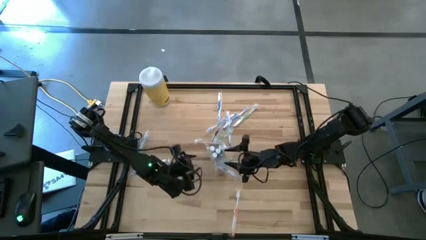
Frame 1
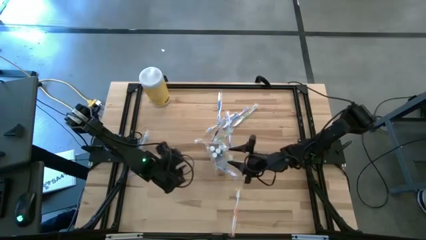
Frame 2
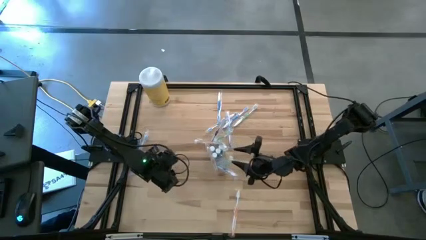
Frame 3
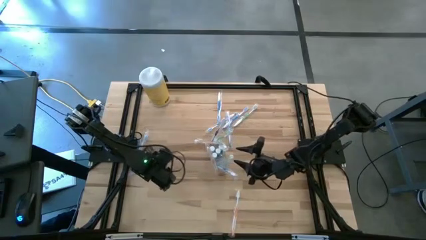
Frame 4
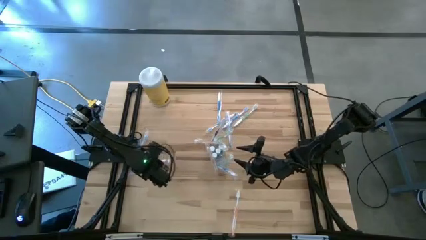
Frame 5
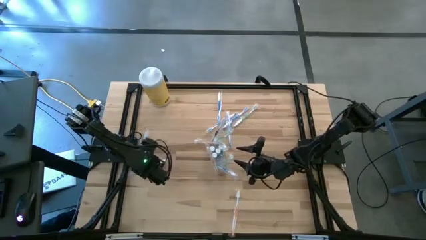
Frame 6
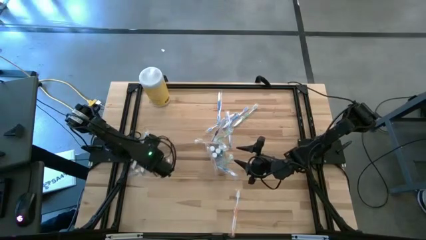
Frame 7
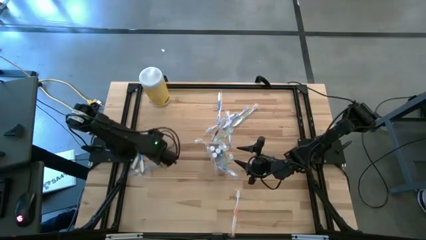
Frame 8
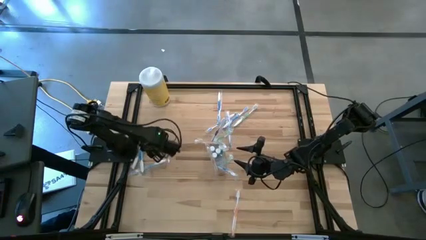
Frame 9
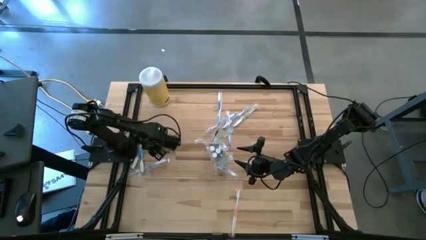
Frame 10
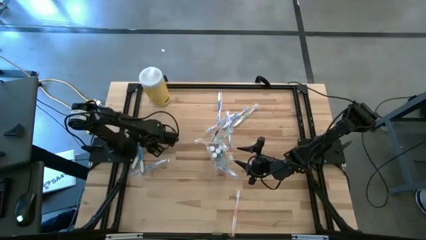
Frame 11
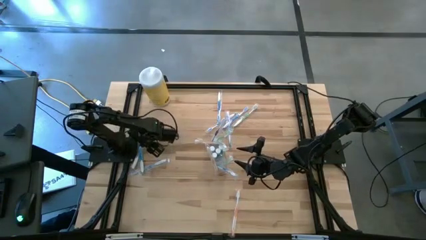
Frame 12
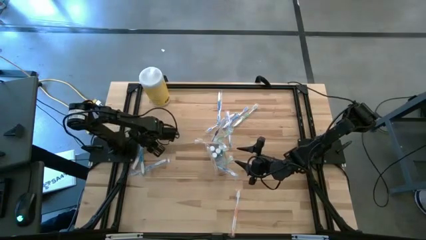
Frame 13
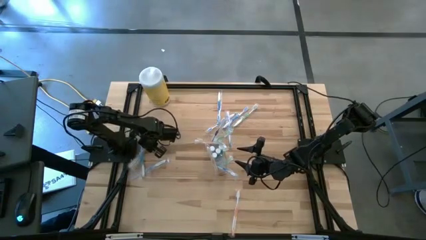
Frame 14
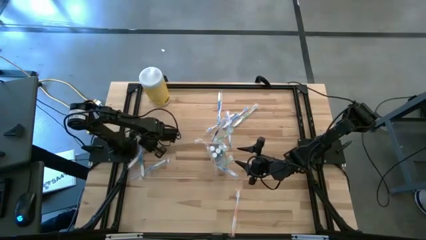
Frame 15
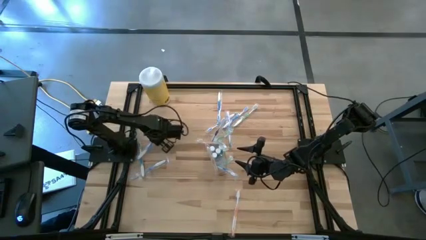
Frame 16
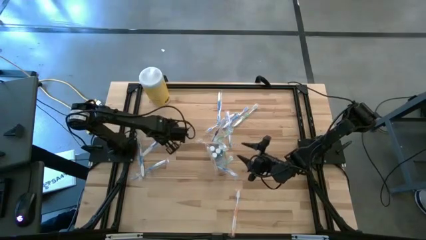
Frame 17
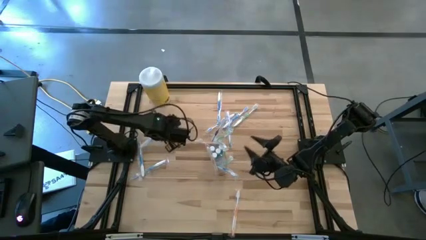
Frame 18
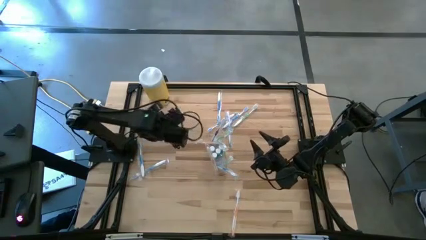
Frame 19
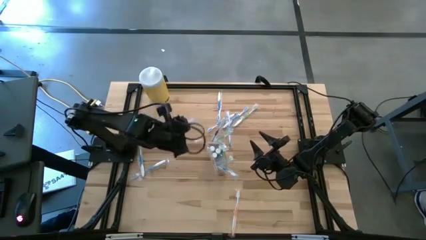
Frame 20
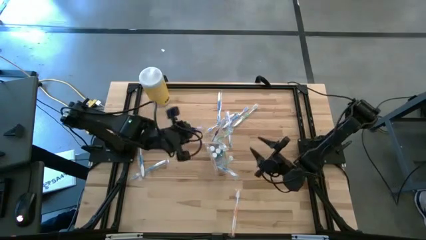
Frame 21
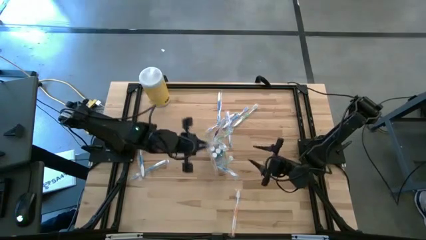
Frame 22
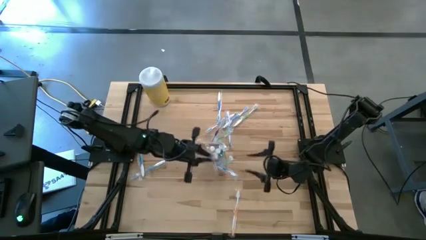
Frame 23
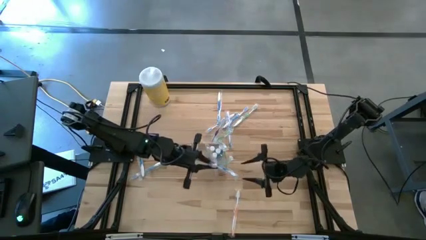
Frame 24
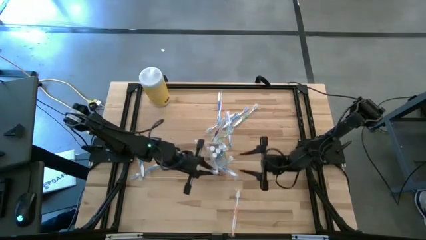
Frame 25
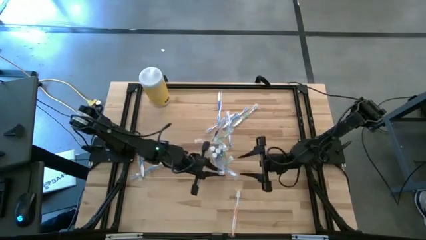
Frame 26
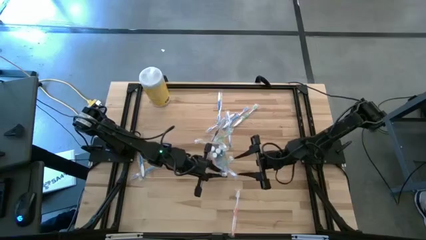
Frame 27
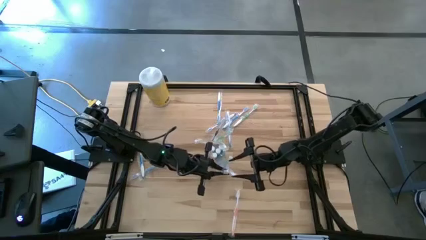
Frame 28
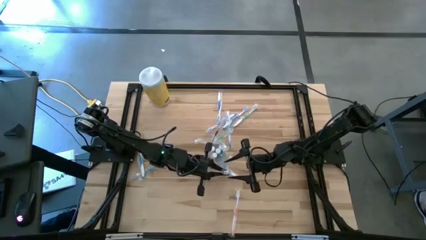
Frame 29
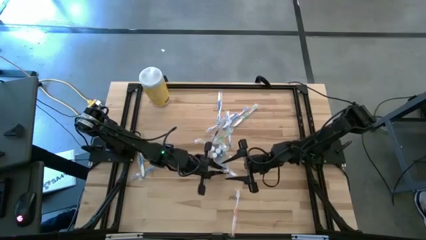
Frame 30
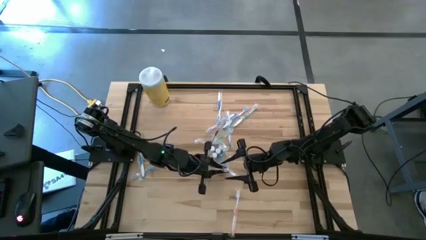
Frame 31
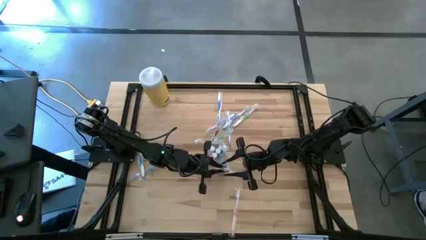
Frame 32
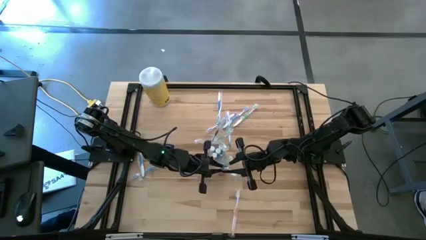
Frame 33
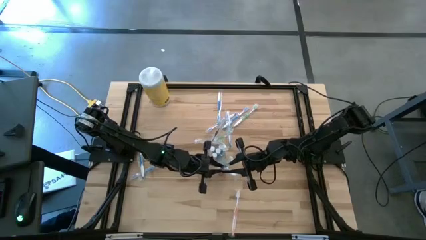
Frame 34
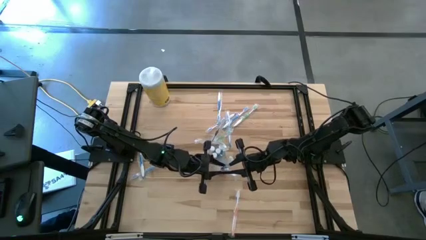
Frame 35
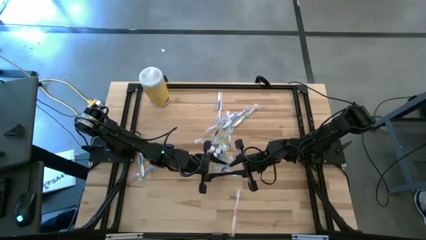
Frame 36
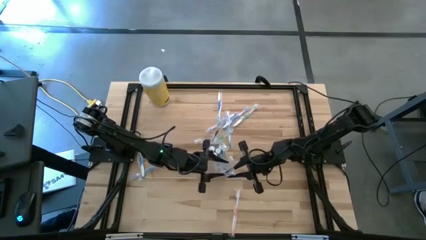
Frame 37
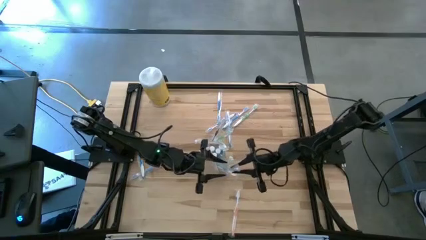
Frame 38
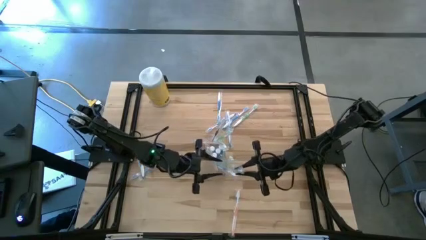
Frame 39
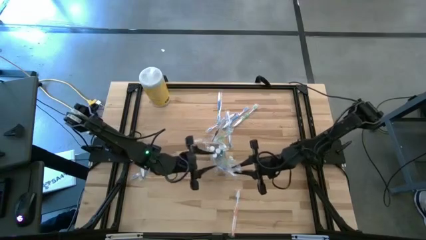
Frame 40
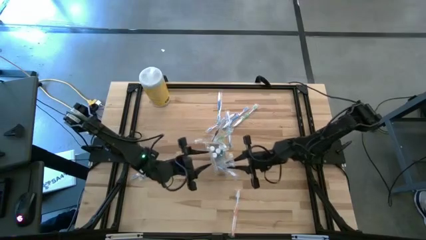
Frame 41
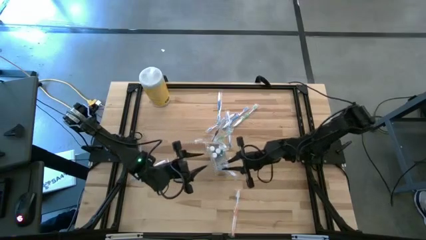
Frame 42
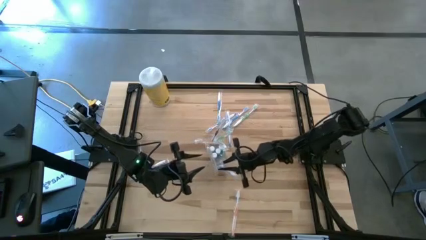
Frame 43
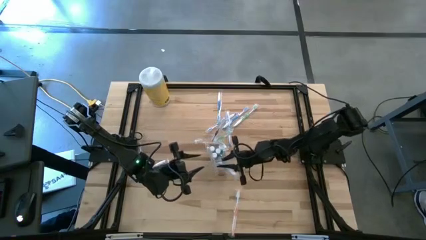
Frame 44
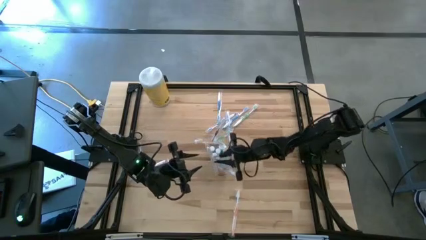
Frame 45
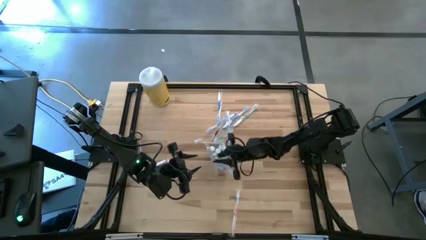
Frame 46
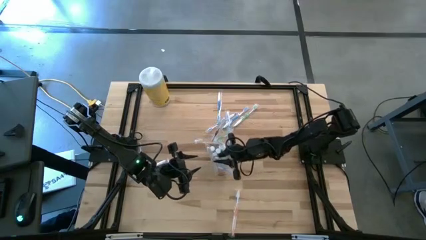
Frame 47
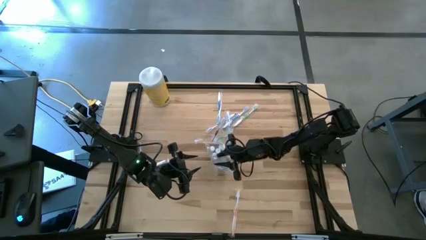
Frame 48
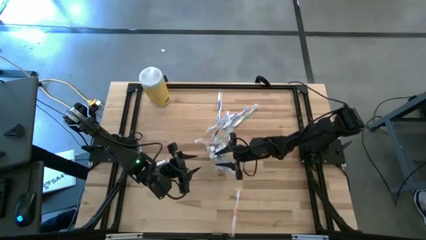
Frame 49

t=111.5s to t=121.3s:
Task: Pick & Place toothbrushing station
Put the blue toothbrush into the transparent organizer

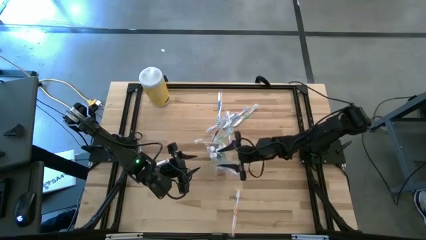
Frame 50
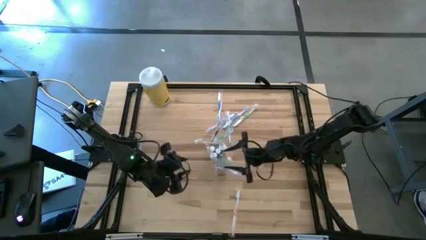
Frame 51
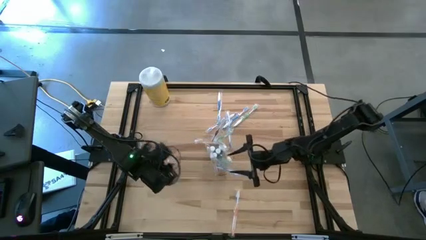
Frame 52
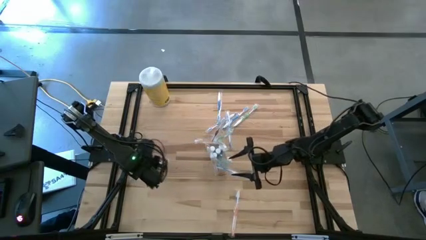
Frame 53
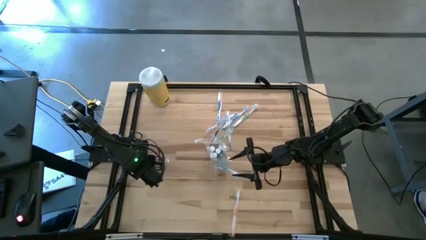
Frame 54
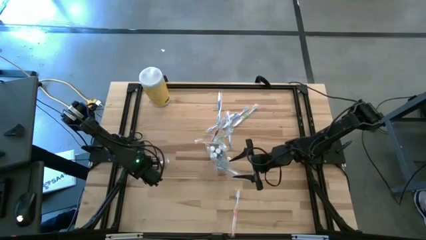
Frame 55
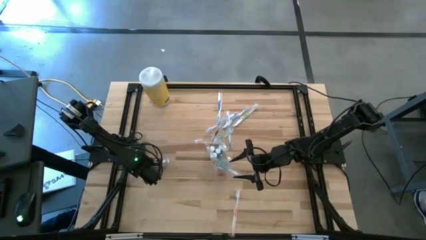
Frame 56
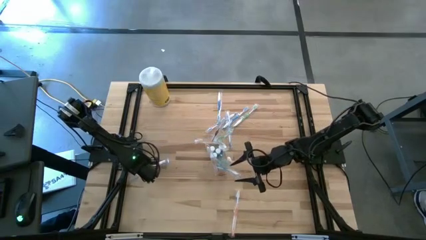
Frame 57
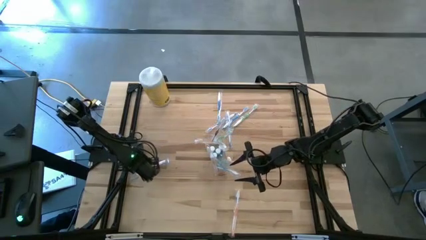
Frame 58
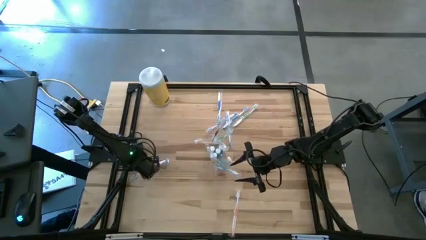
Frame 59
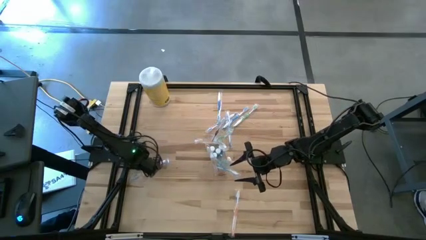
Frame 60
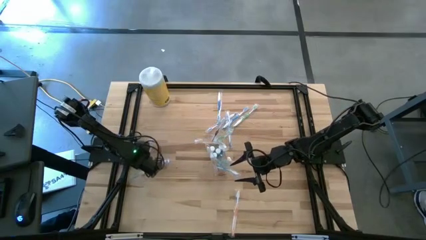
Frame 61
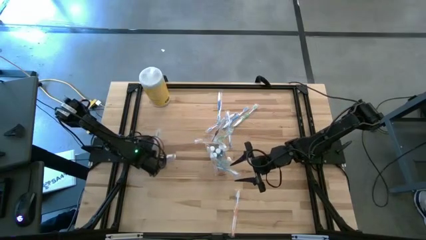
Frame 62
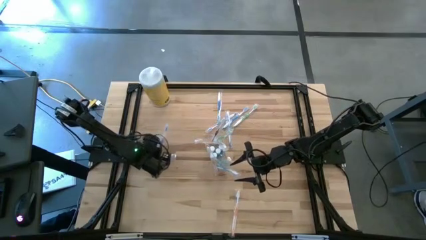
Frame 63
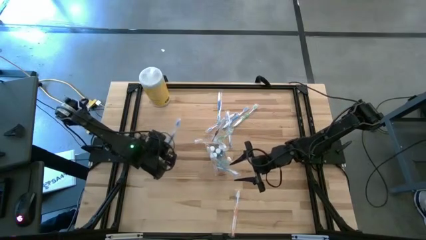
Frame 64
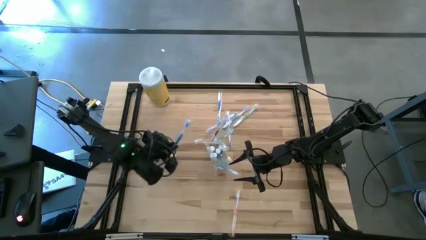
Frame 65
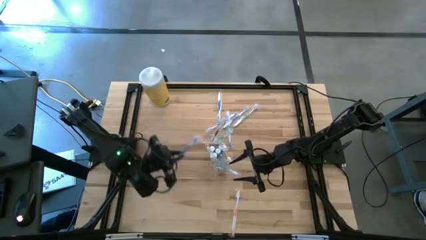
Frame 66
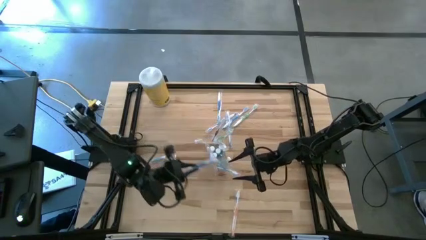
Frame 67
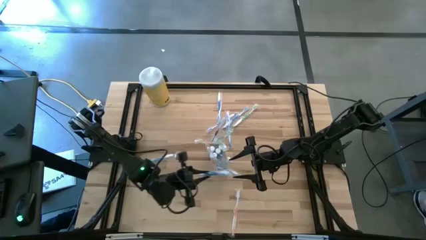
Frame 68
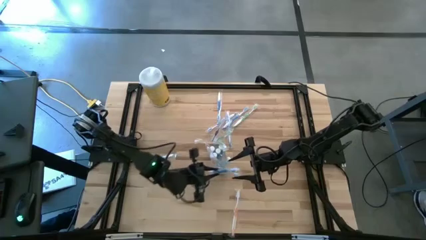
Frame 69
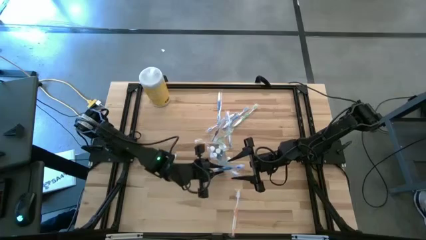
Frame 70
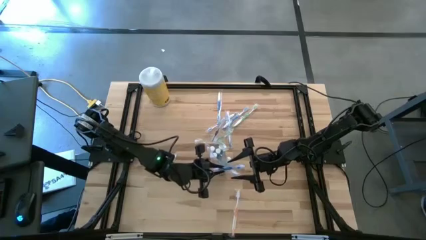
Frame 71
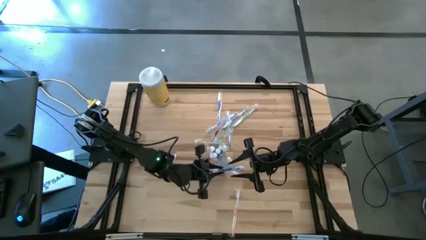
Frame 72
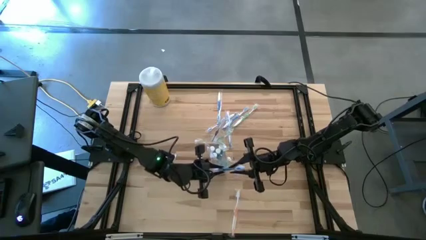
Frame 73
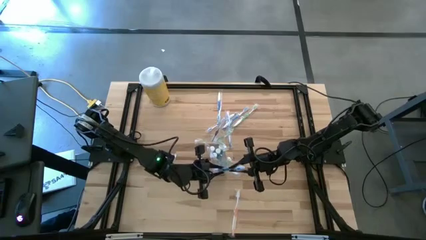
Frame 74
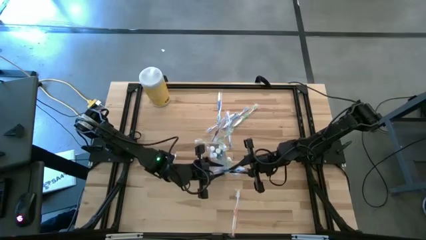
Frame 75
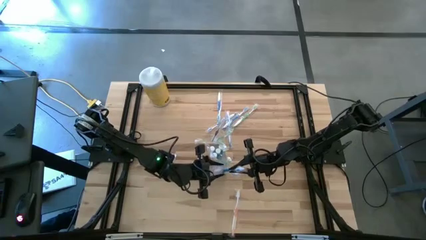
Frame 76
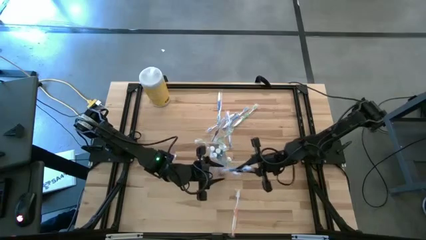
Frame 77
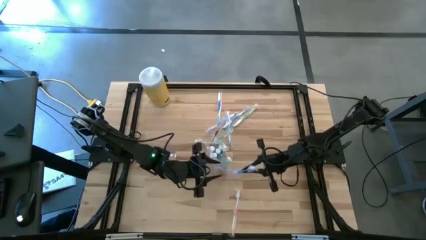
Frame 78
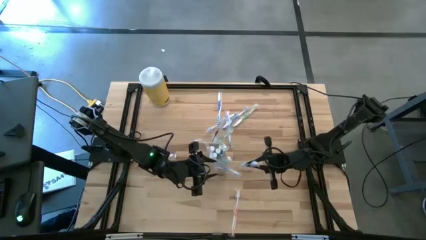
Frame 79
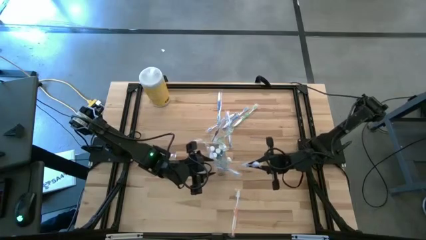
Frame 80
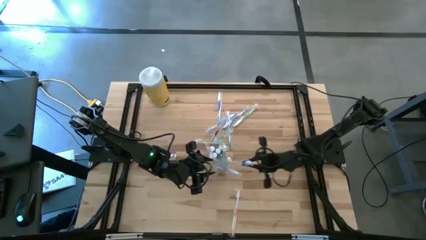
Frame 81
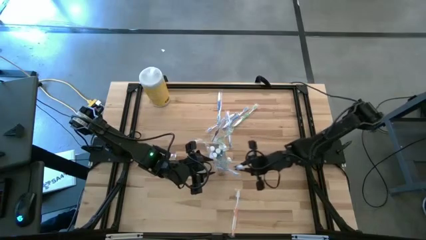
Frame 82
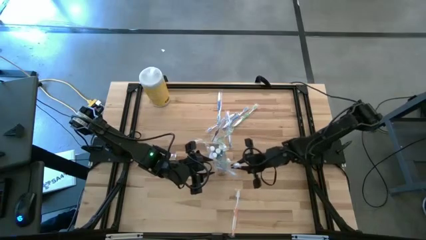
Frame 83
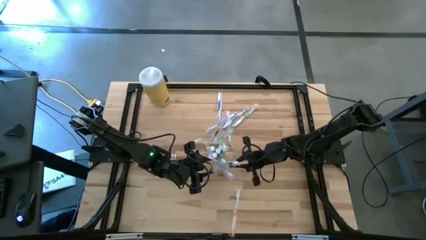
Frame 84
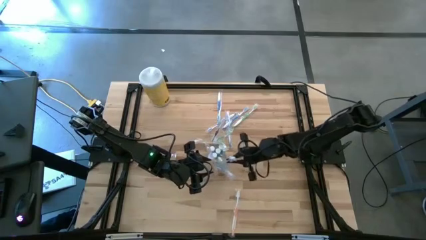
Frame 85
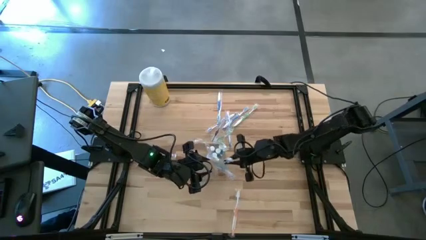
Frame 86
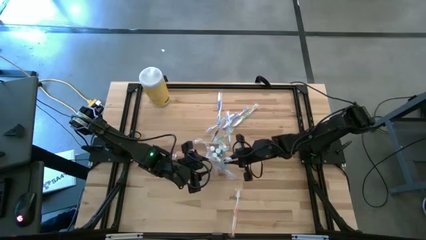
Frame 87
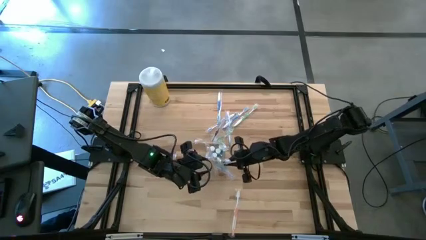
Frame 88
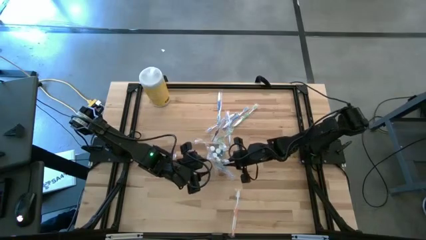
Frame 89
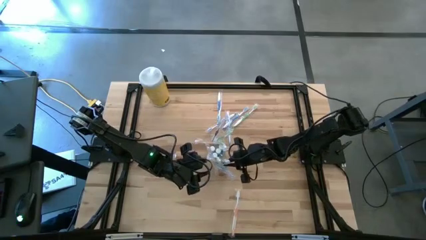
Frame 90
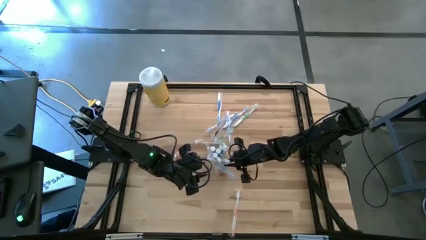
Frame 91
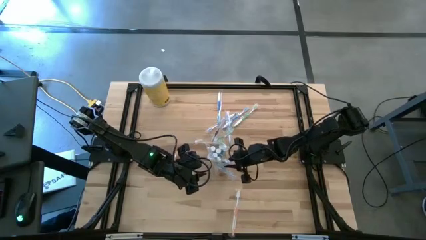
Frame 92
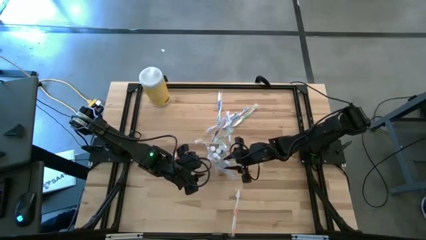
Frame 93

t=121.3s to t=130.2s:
Put the blue toothbrush into the transparent organizer
